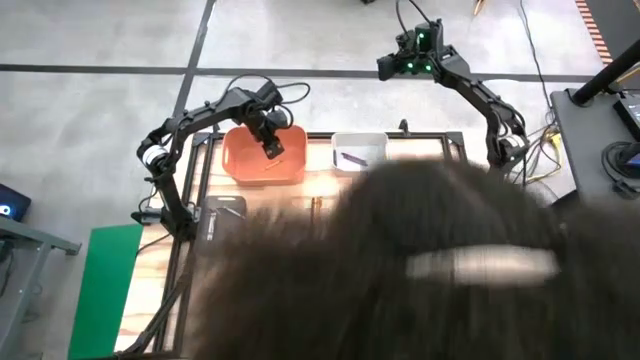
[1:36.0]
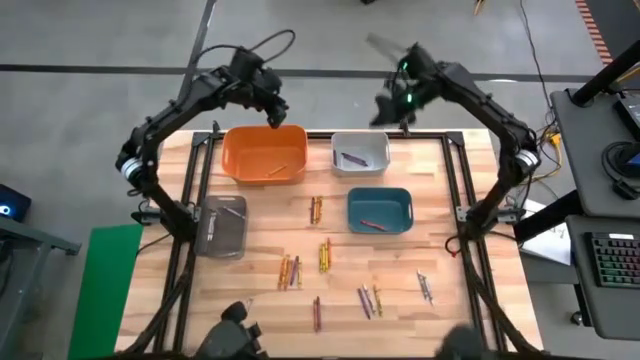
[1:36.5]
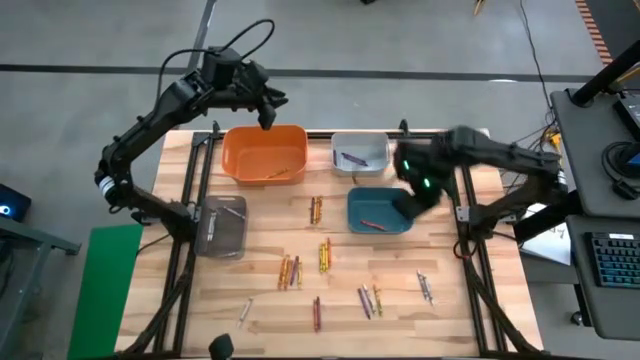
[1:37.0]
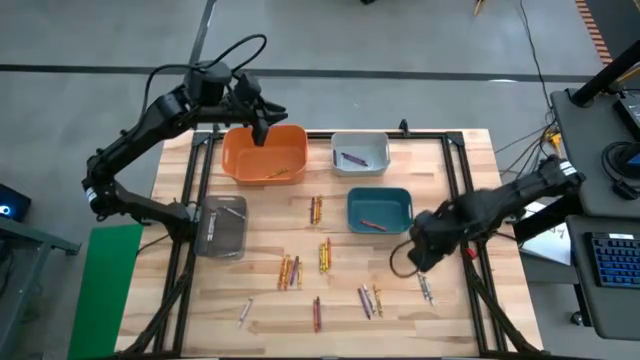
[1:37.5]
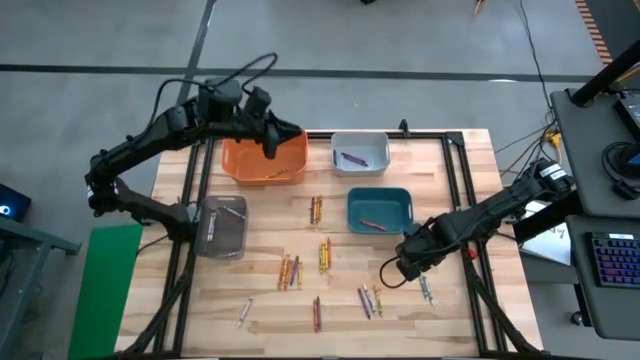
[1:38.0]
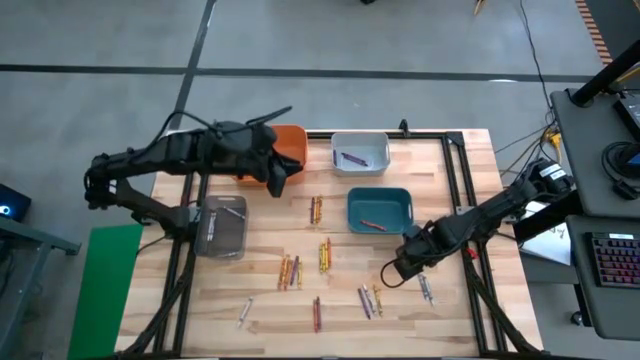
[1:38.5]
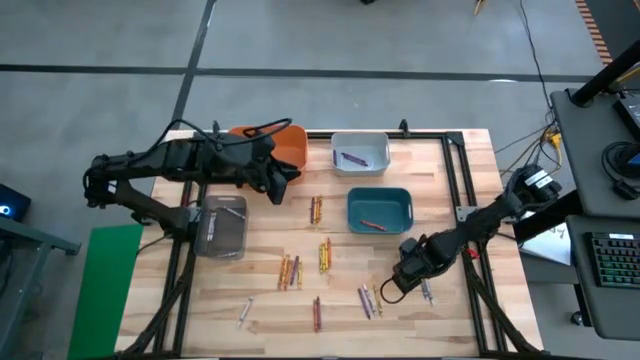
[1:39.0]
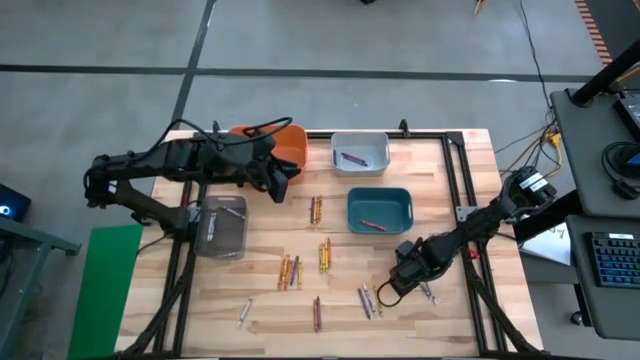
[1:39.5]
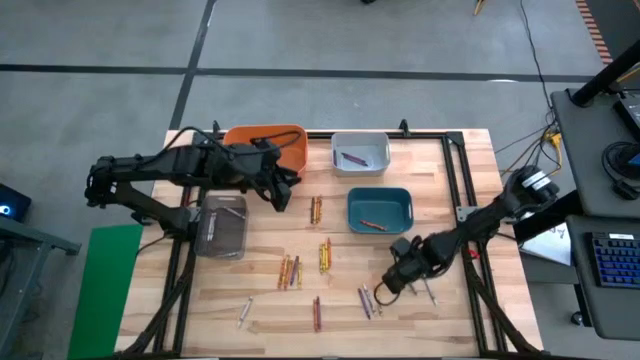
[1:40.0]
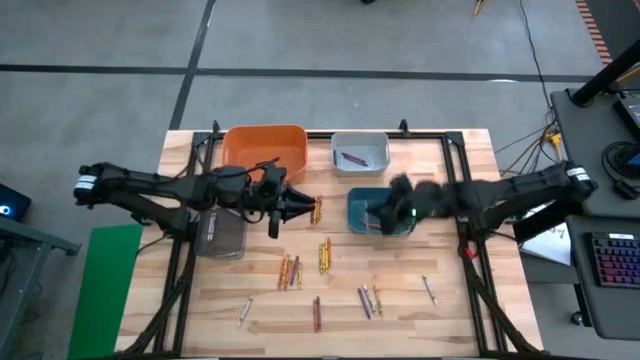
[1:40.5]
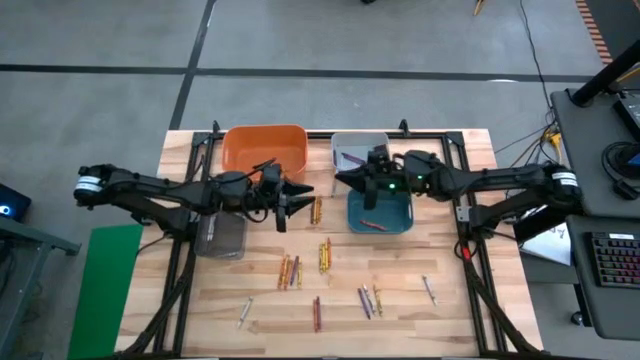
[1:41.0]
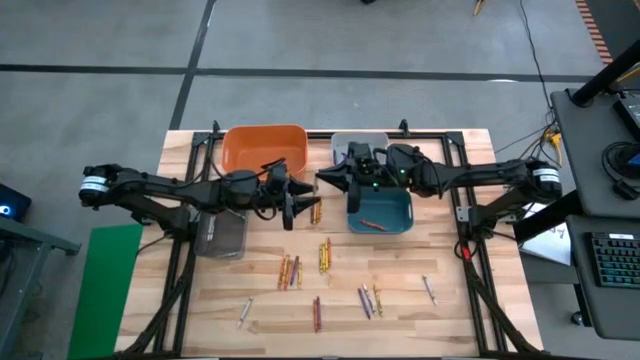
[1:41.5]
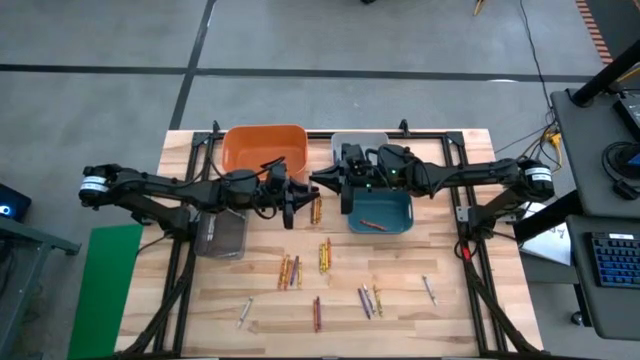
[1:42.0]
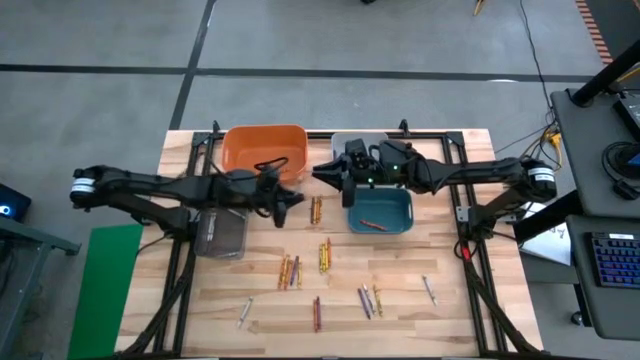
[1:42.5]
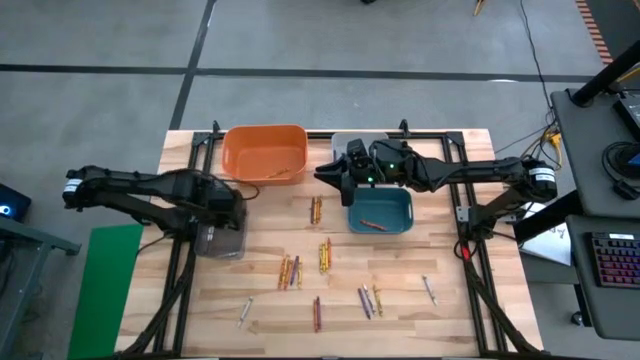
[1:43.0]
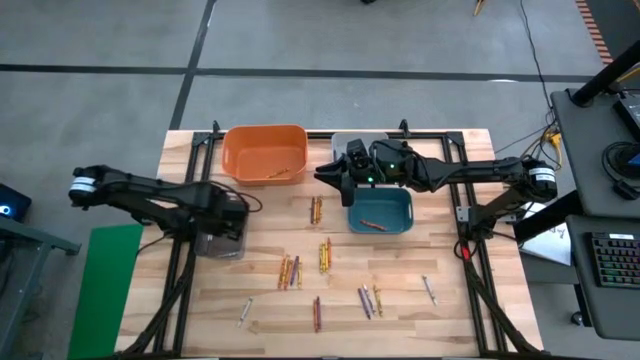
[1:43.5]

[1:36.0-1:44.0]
Task: Sort crayons
Put the white crayon into the black bin

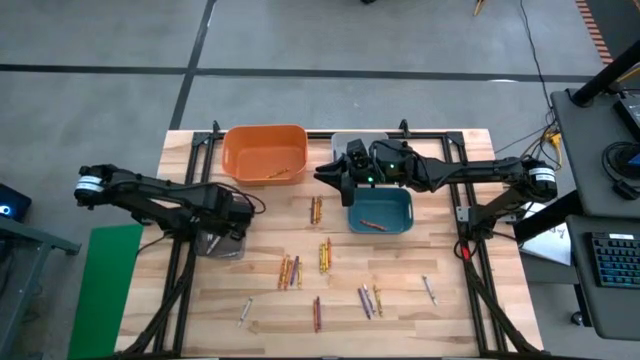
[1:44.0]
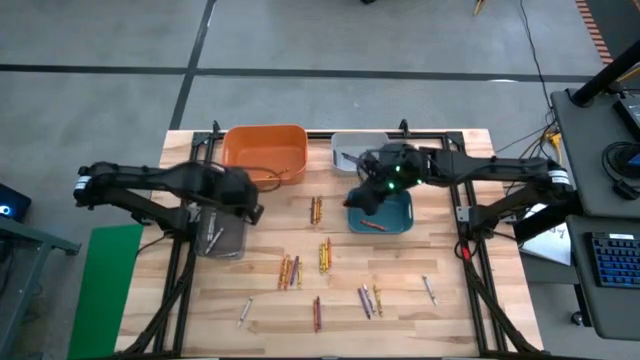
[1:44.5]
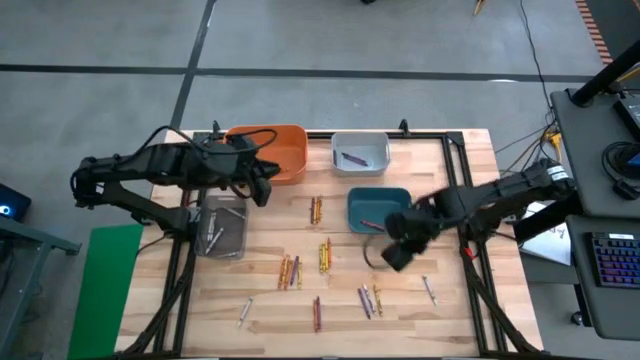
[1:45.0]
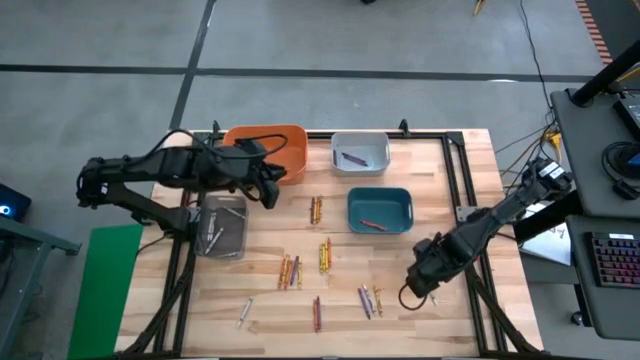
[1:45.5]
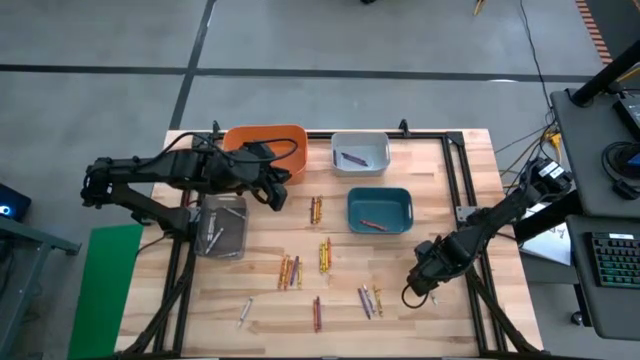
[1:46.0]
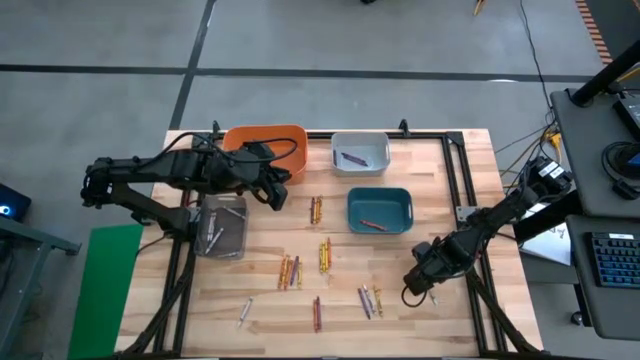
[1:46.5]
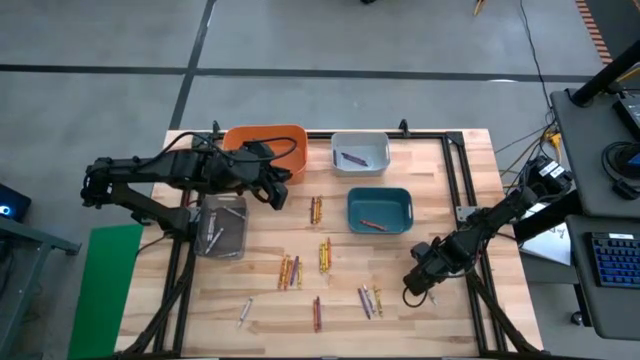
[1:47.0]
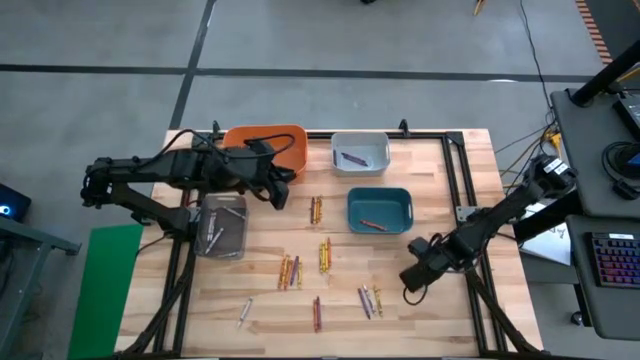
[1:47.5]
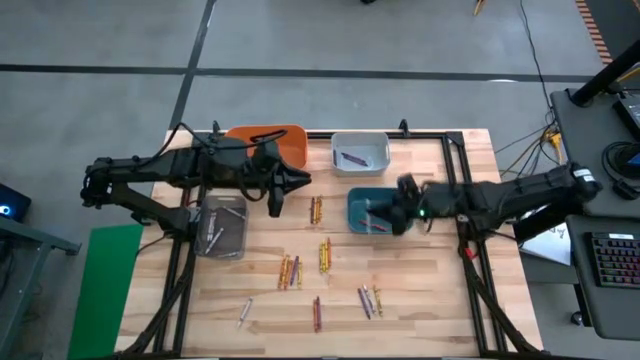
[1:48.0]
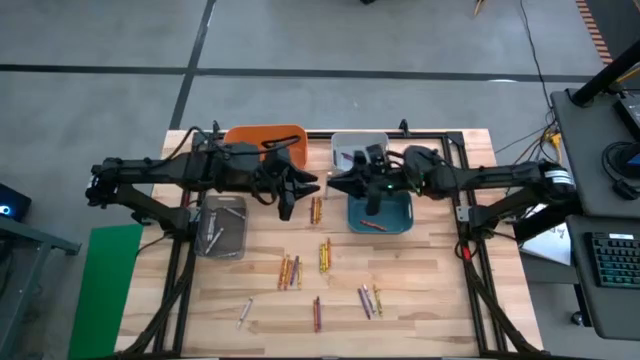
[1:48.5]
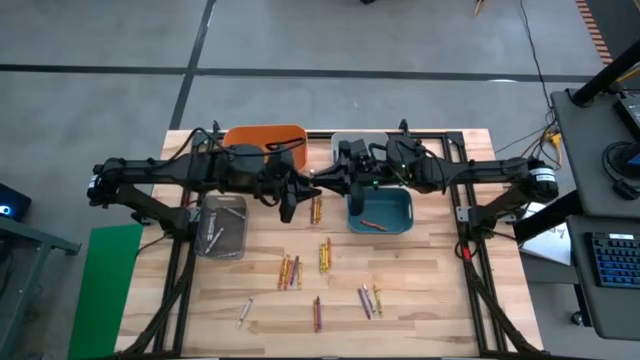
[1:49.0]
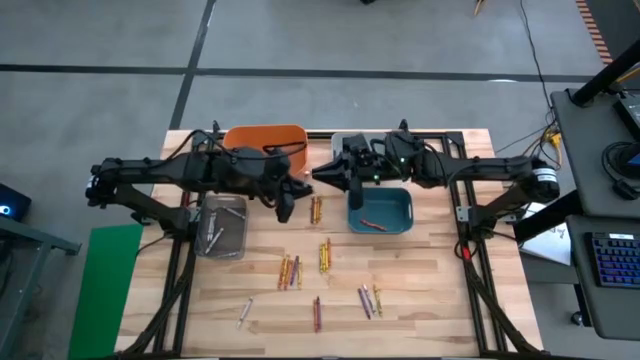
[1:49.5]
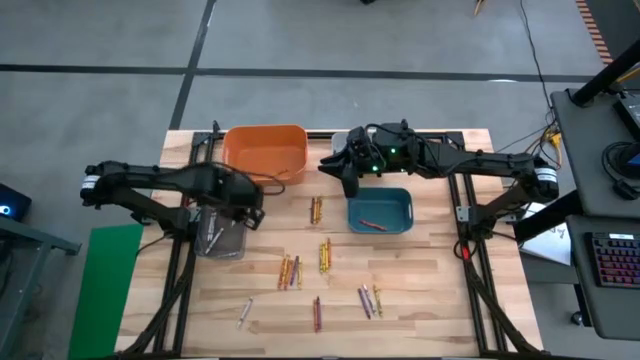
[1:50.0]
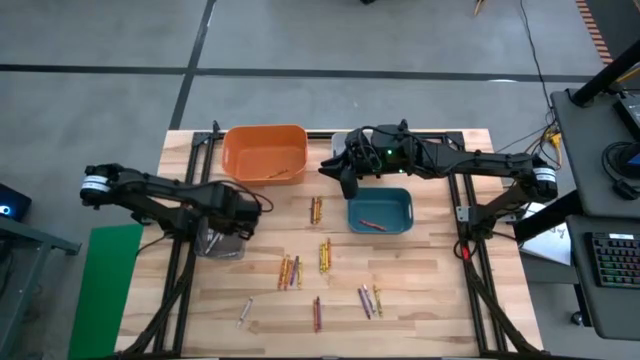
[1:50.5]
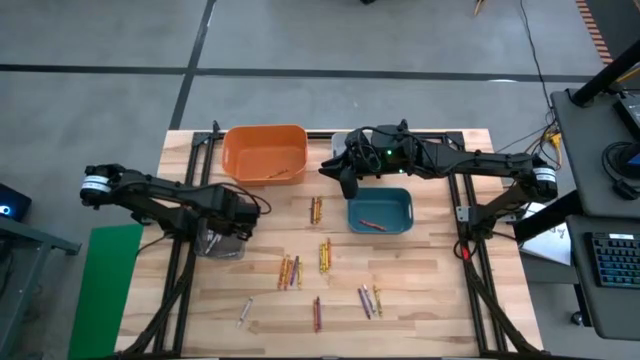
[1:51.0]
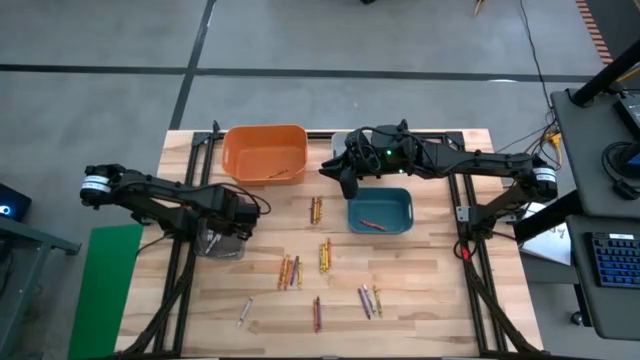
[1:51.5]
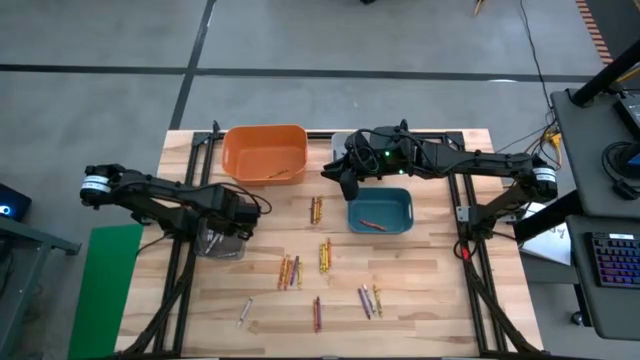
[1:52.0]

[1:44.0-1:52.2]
Put the white crayon into the black bin

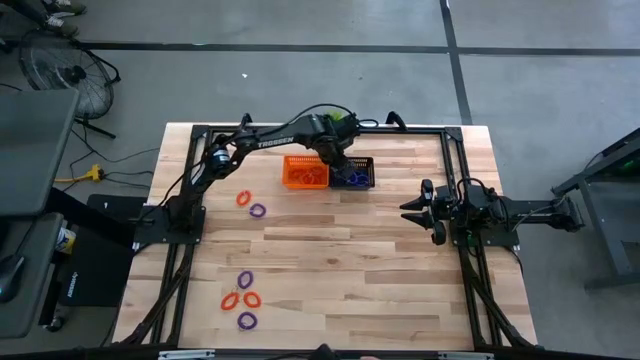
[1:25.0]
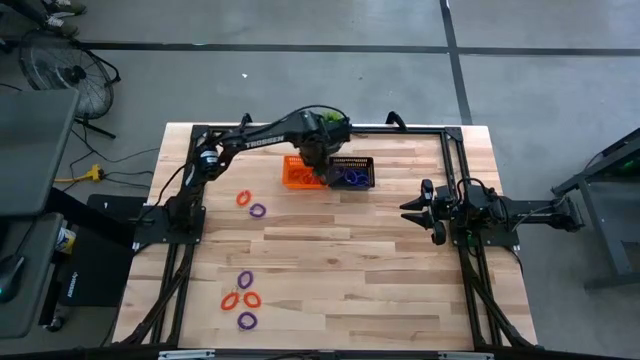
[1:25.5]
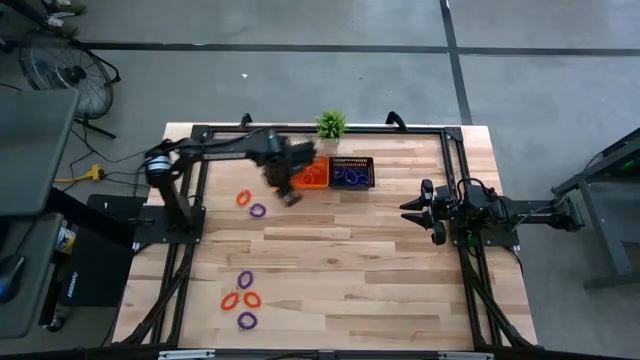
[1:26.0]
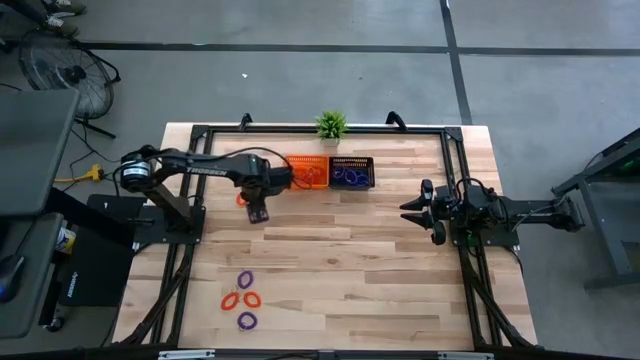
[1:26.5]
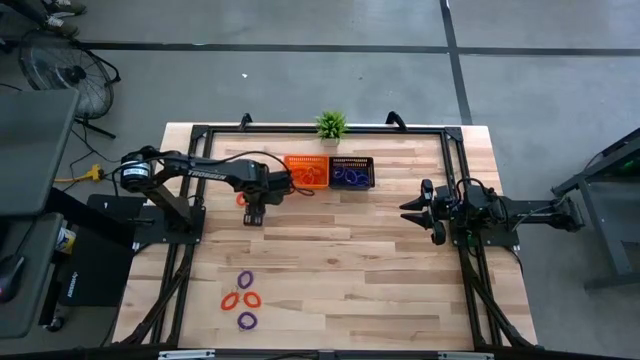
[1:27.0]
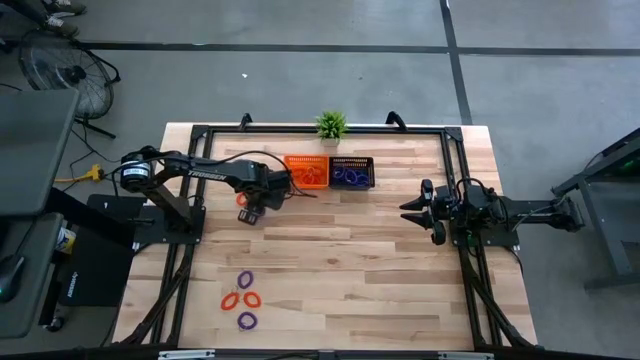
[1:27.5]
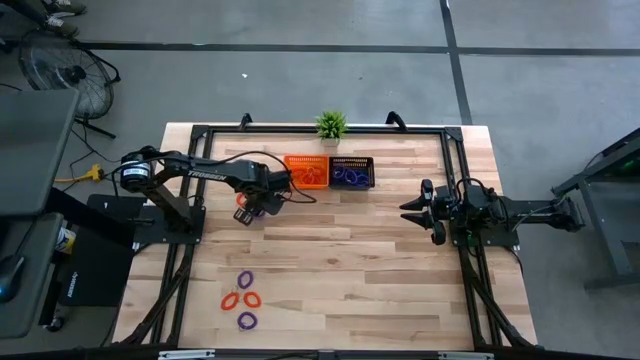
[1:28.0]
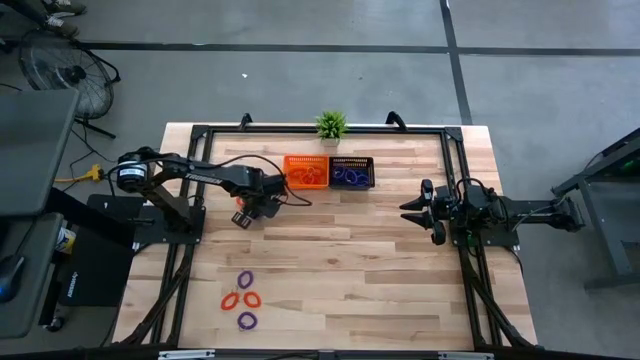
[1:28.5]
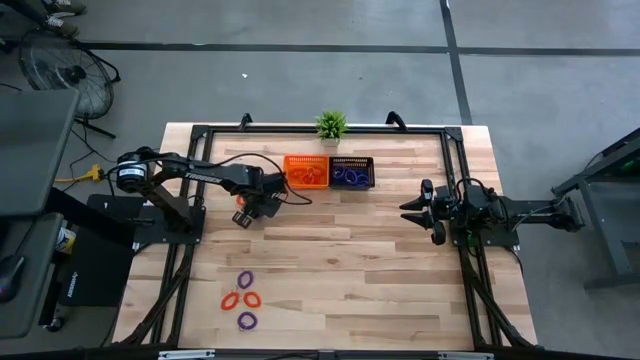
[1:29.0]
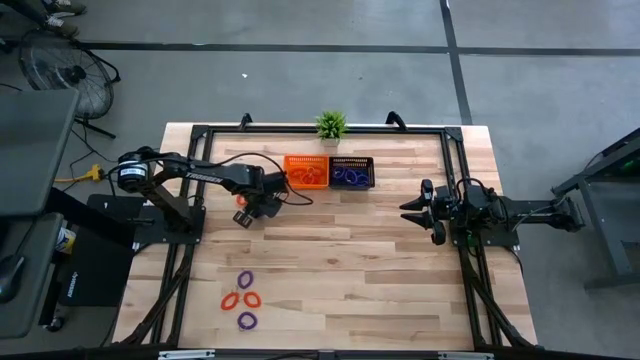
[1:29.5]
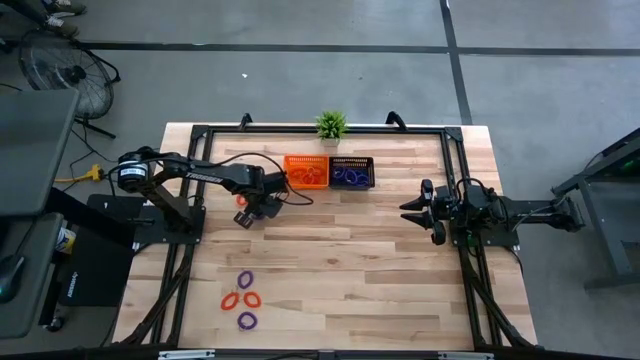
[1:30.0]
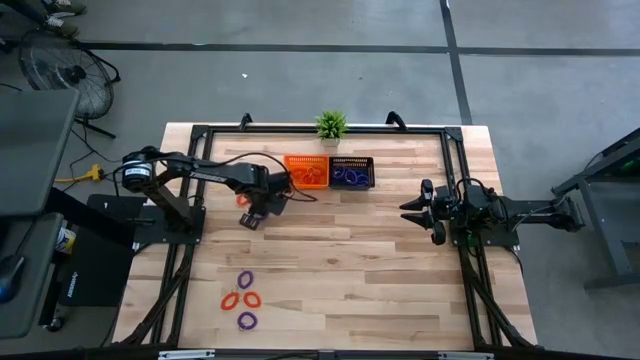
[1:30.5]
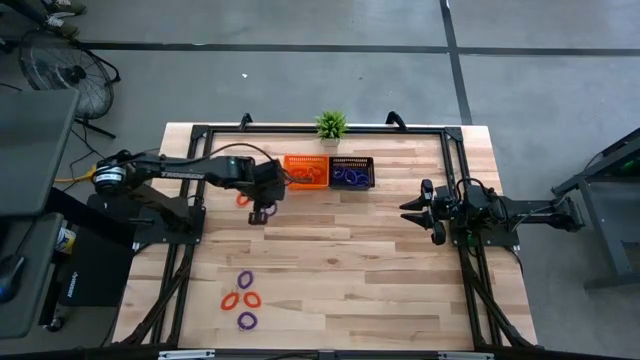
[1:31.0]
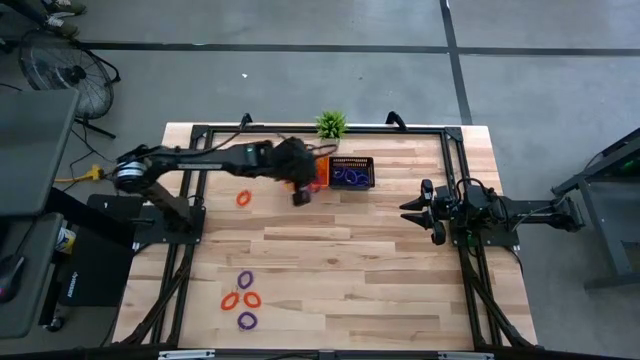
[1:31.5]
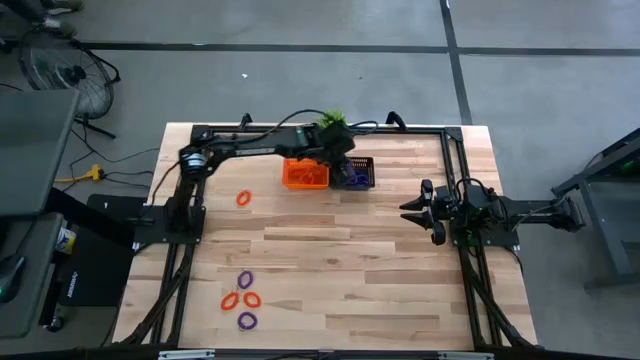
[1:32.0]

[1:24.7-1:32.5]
Task: Sort spring keychains into baskets
Put the purple spring keychain into the black basket
